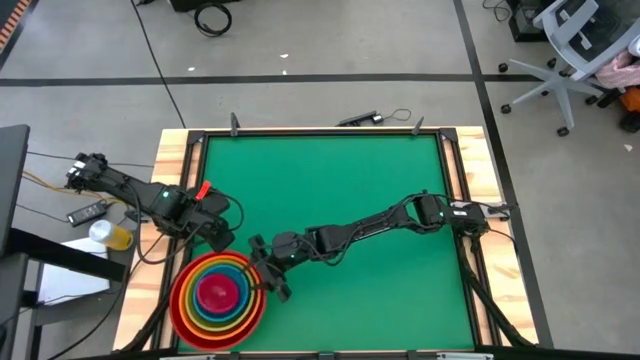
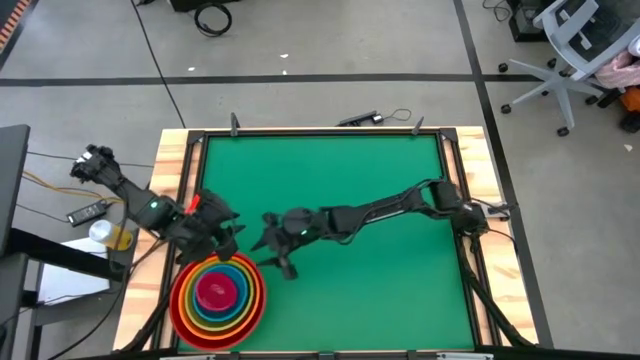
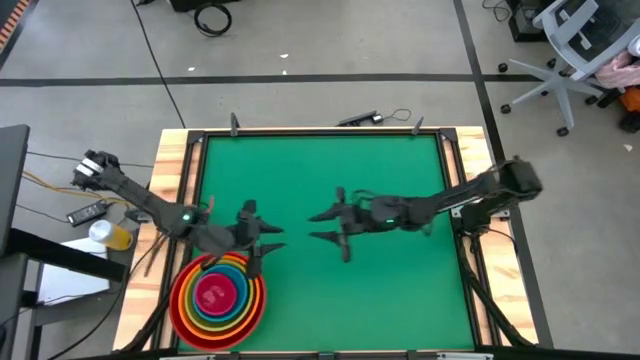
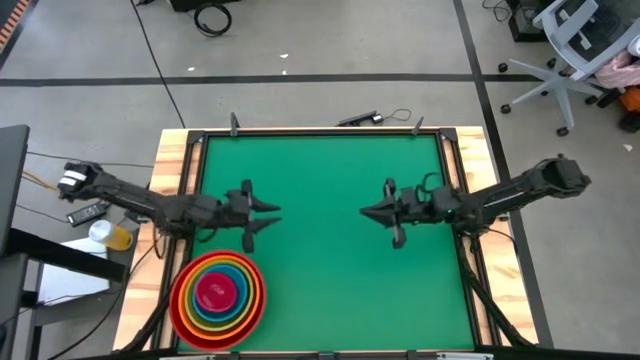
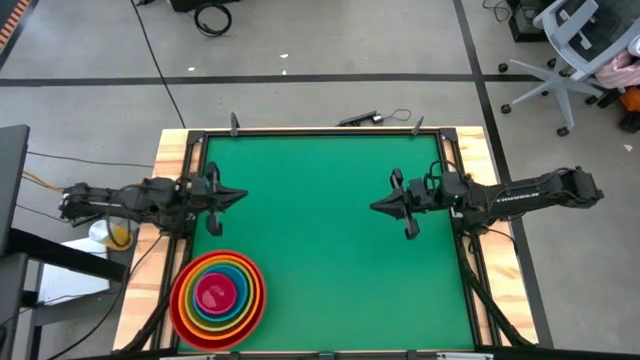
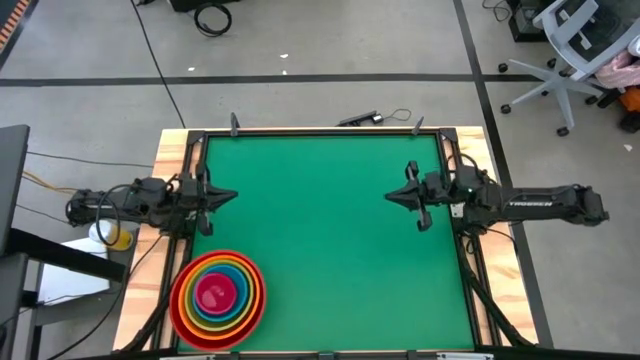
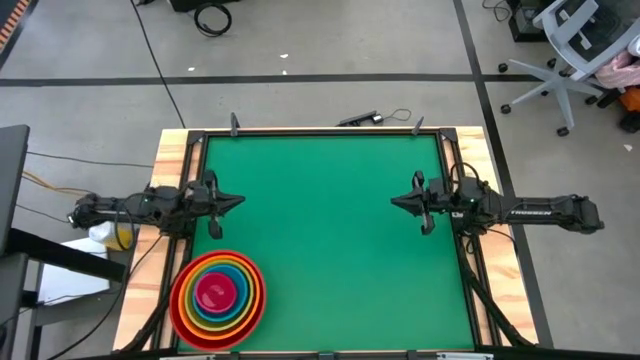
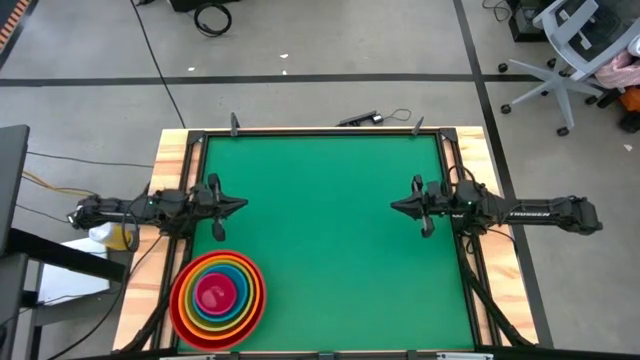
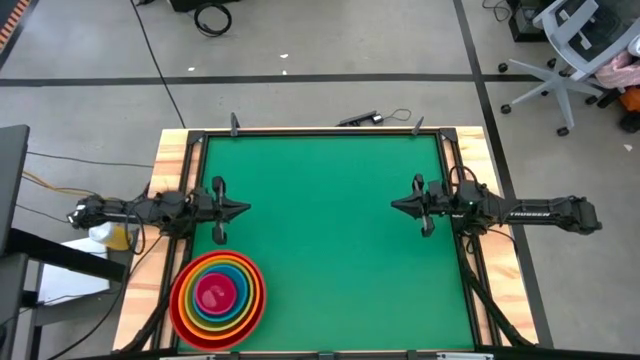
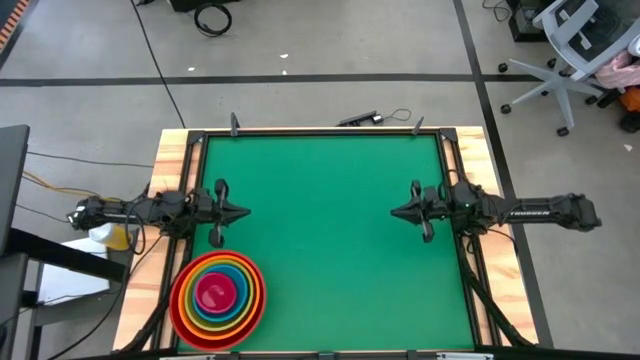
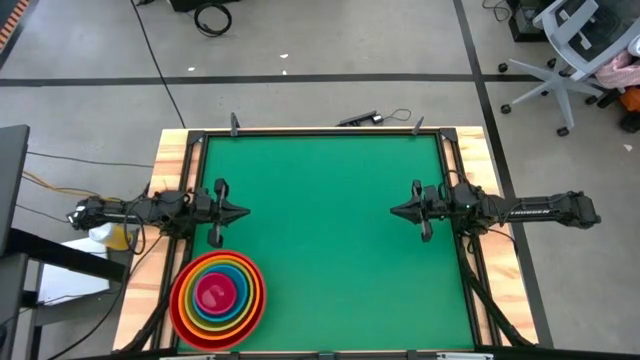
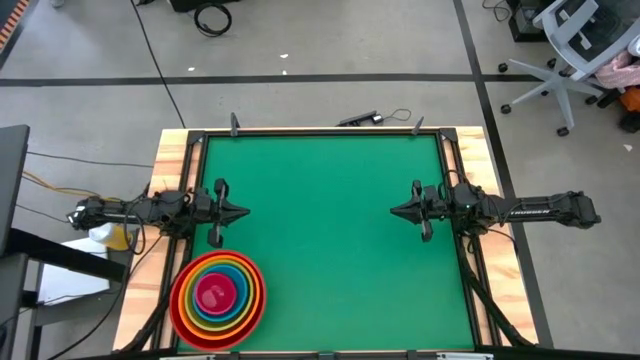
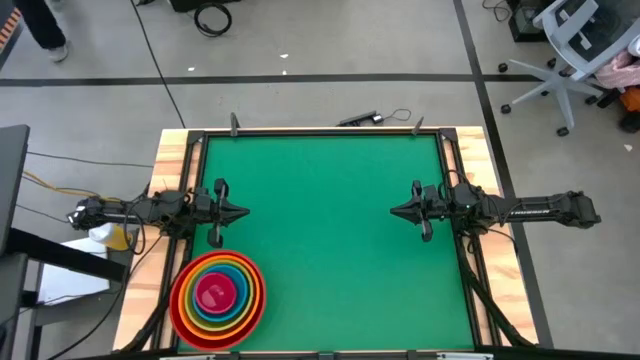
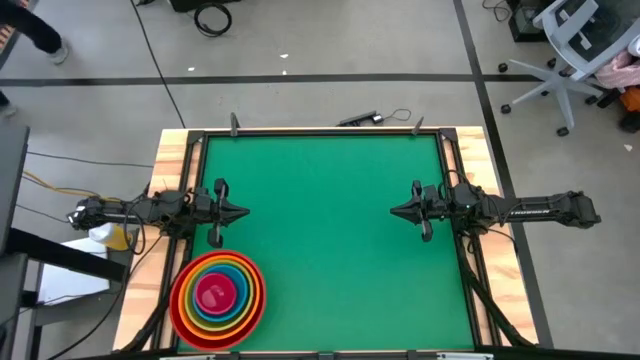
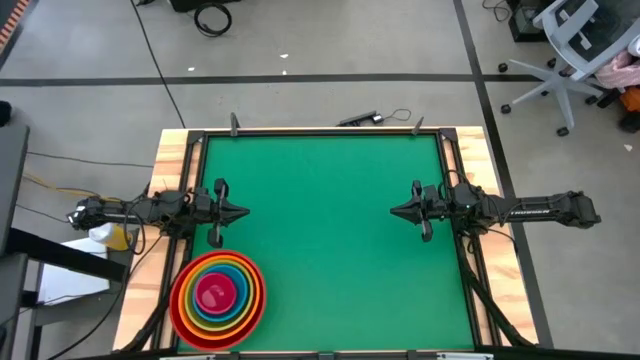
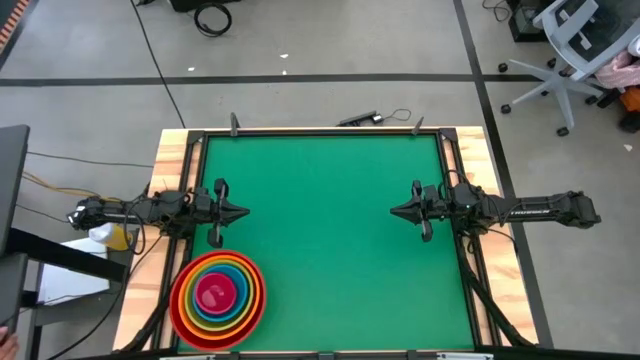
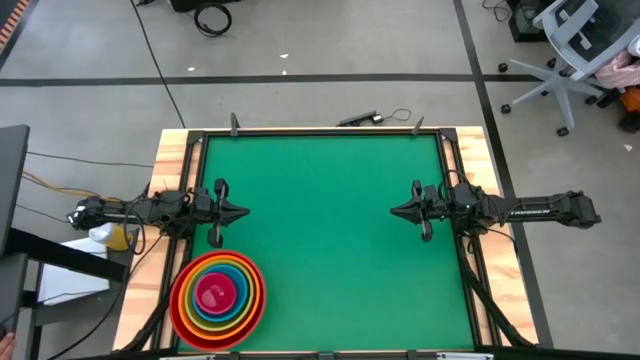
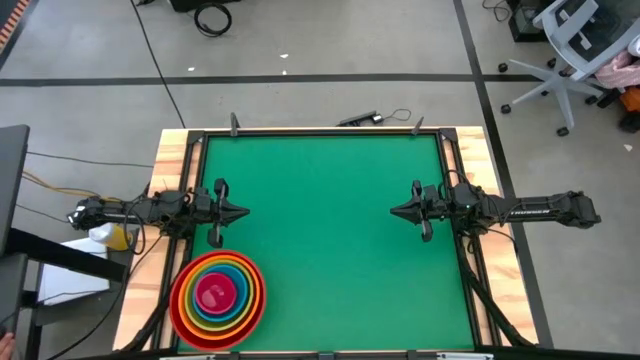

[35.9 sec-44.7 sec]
Return to Home Position

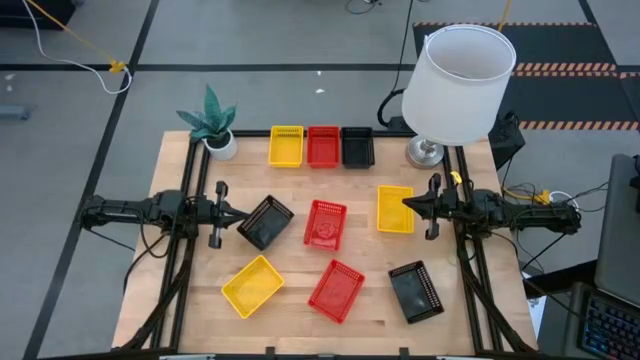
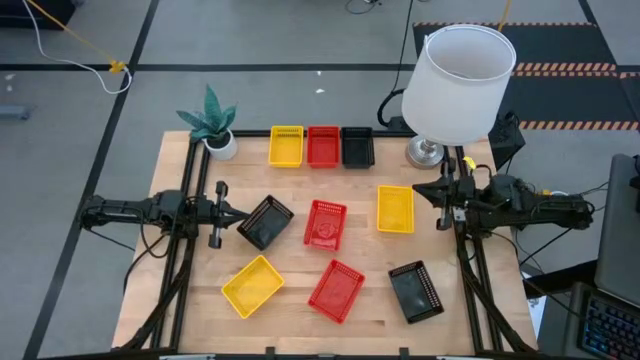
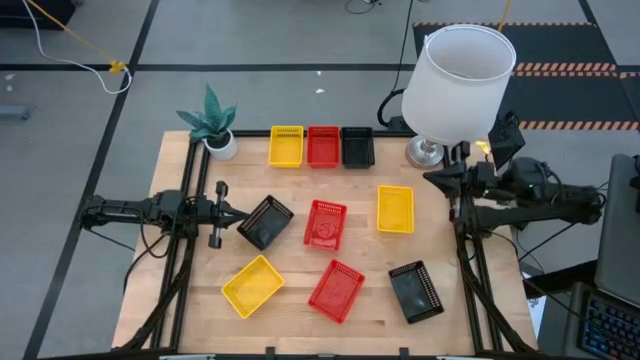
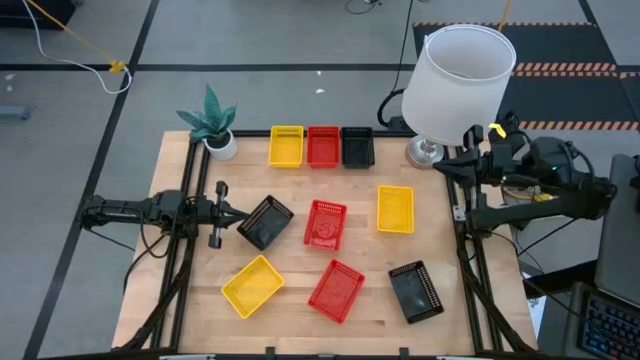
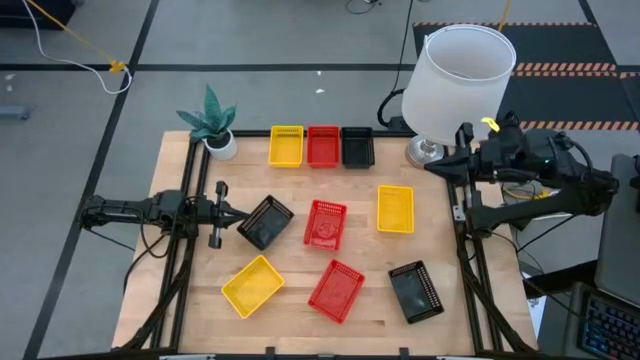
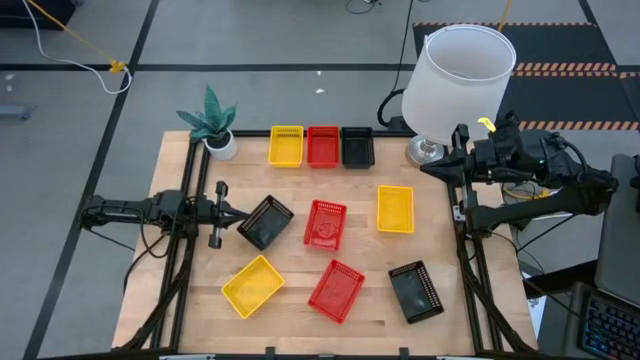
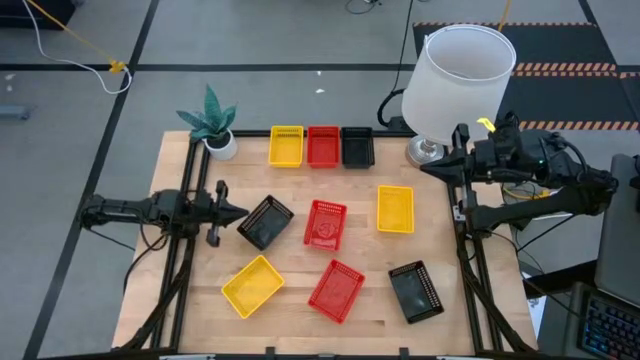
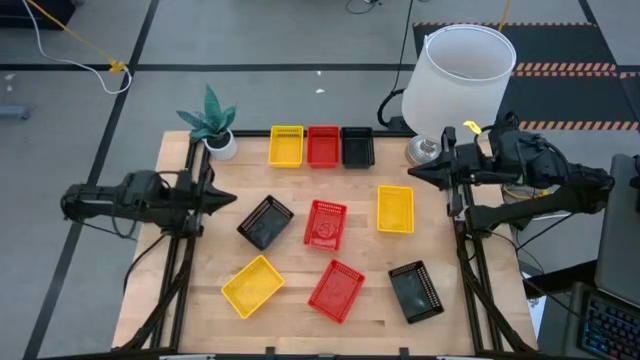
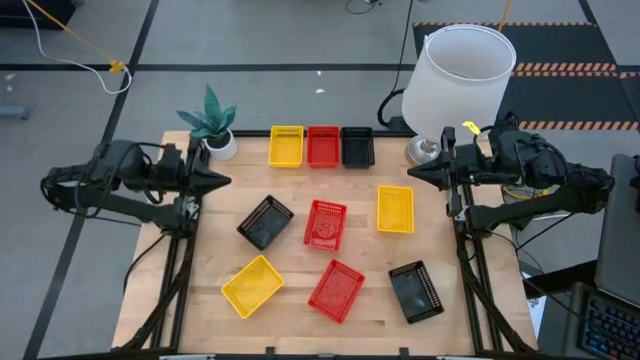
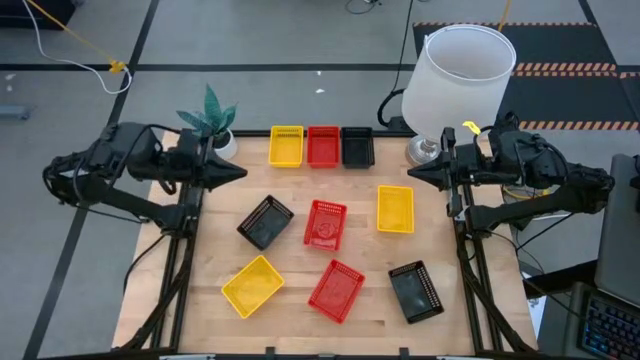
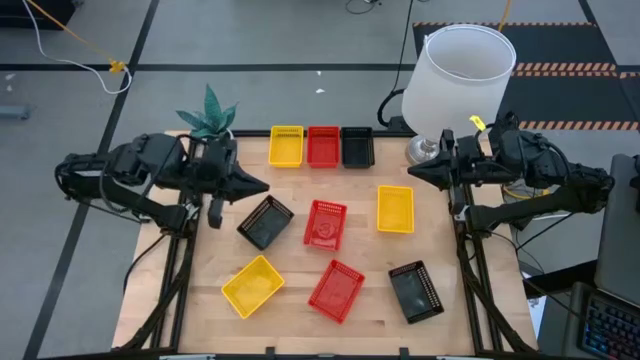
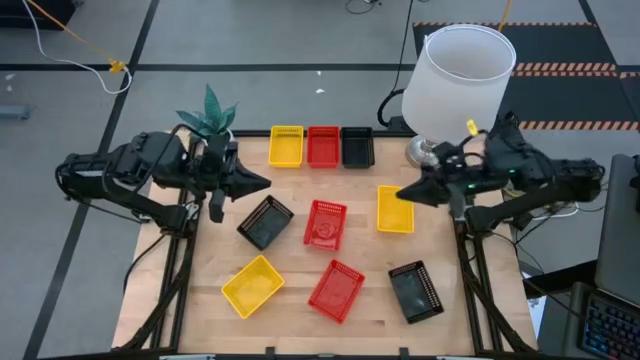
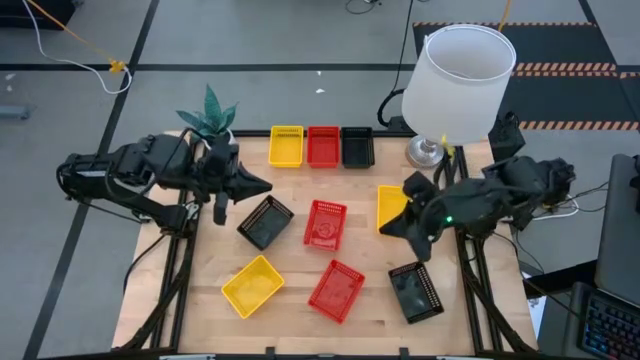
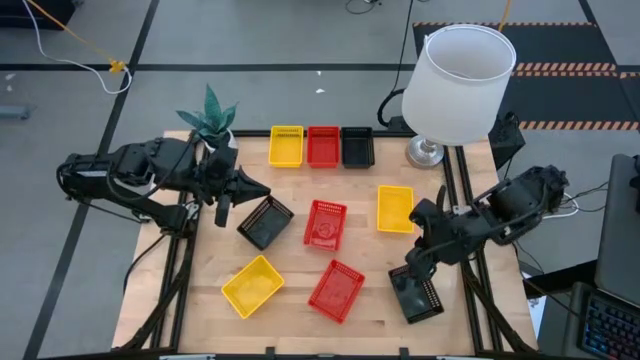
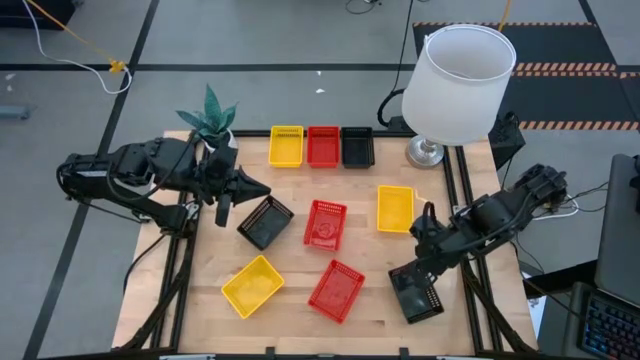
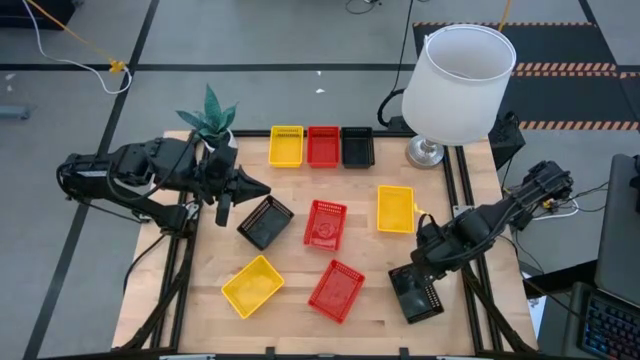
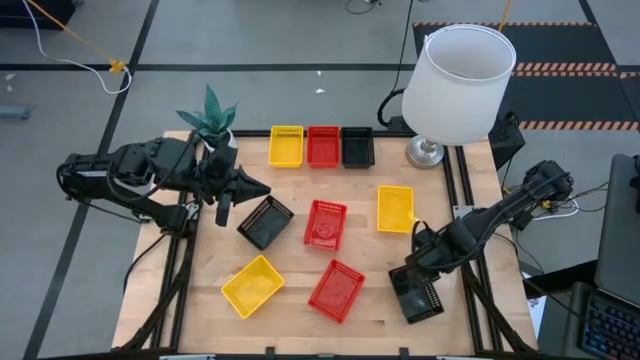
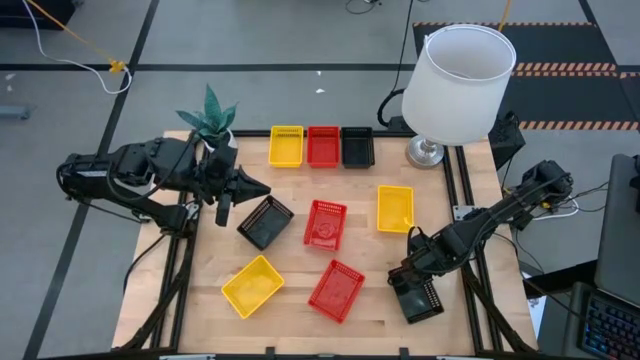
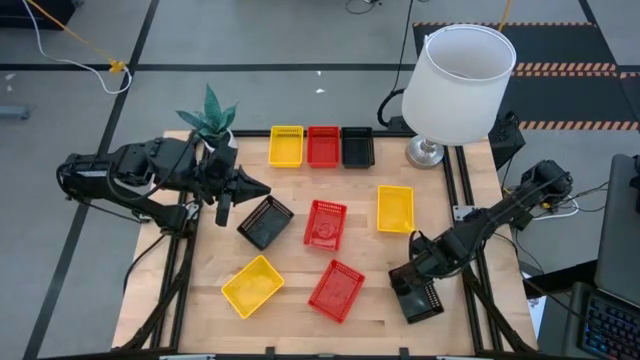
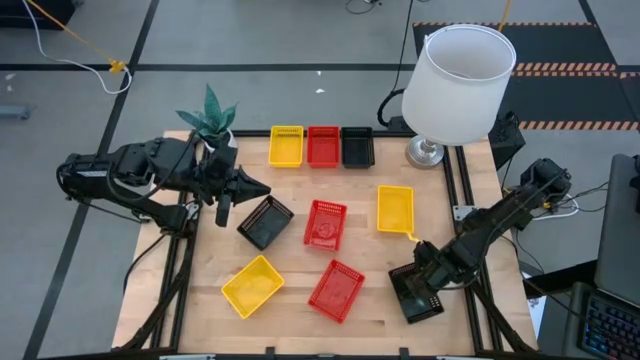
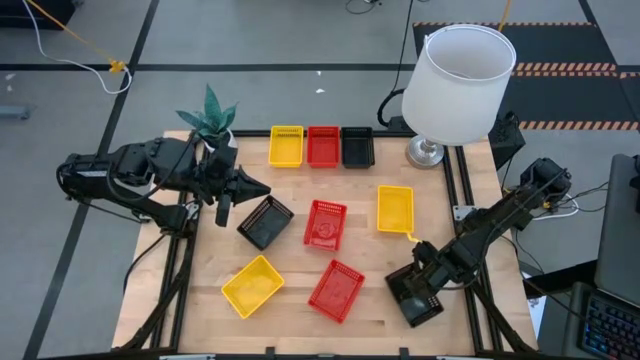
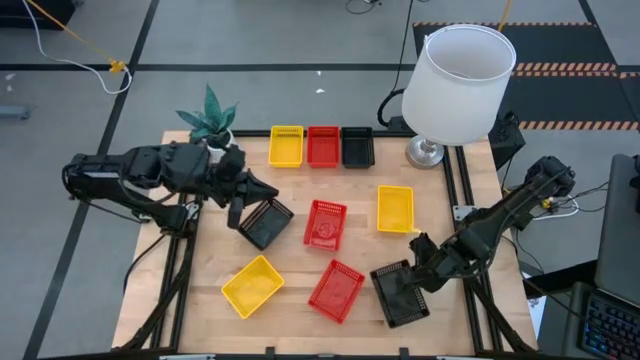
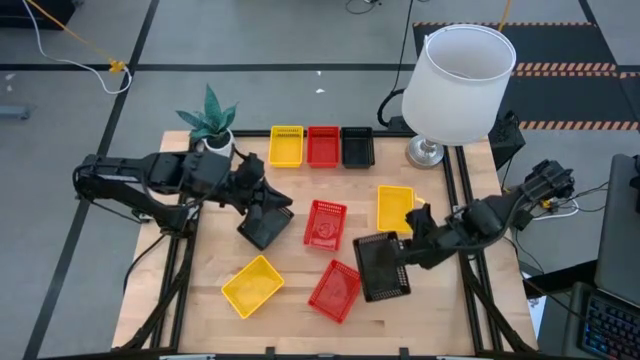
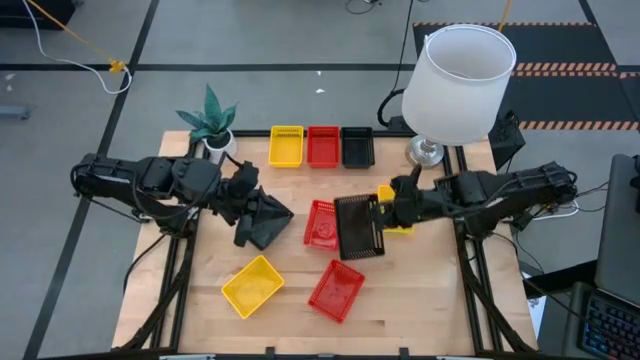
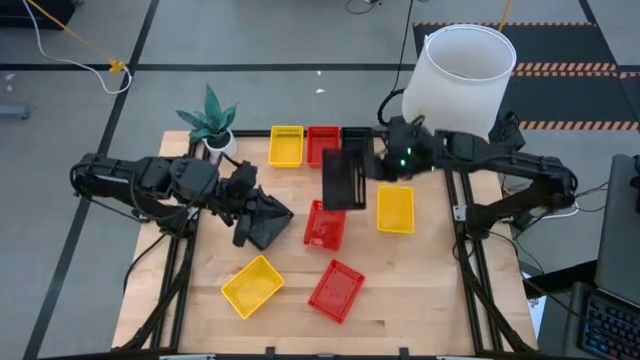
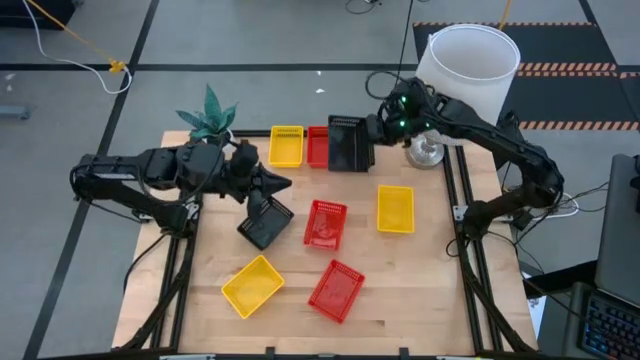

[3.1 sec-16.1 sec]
Stack the bottom right black basket on the top black basket
